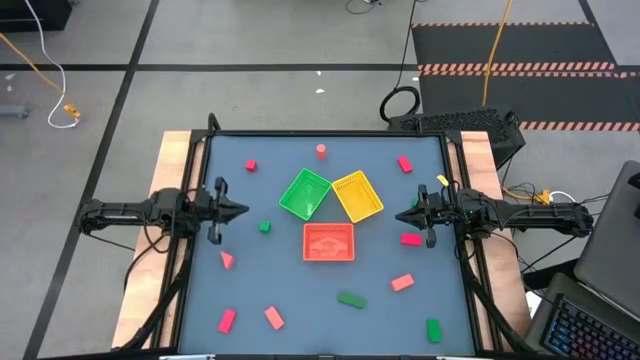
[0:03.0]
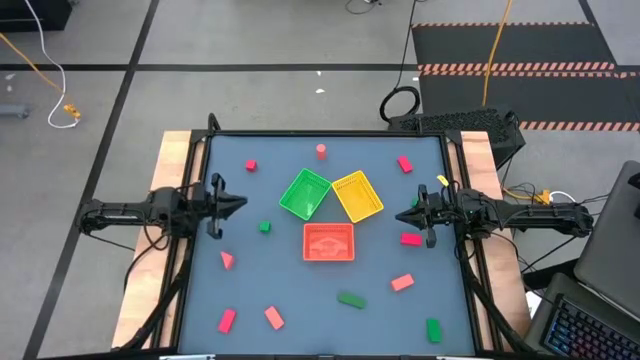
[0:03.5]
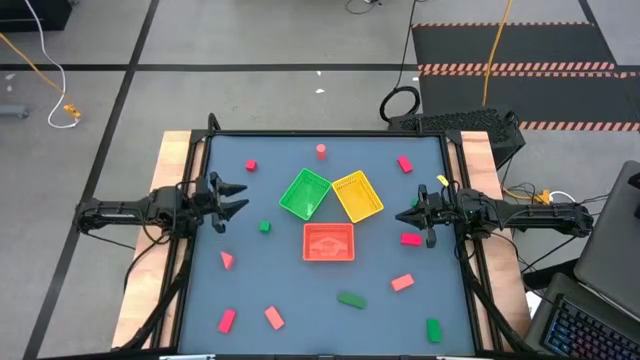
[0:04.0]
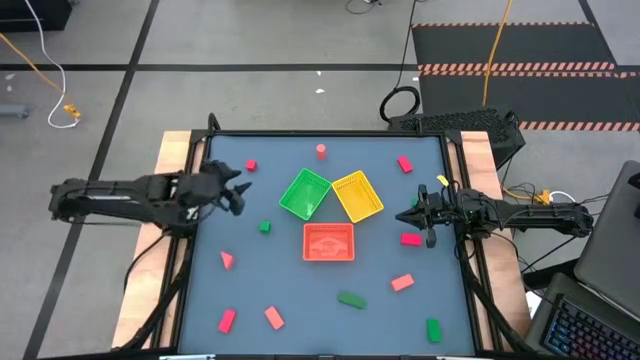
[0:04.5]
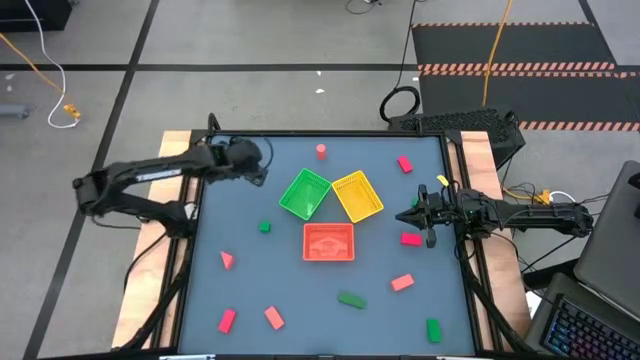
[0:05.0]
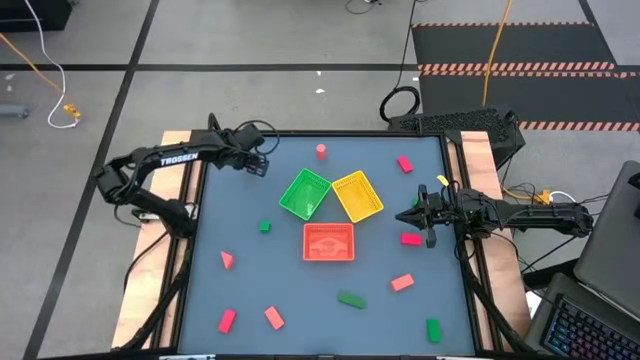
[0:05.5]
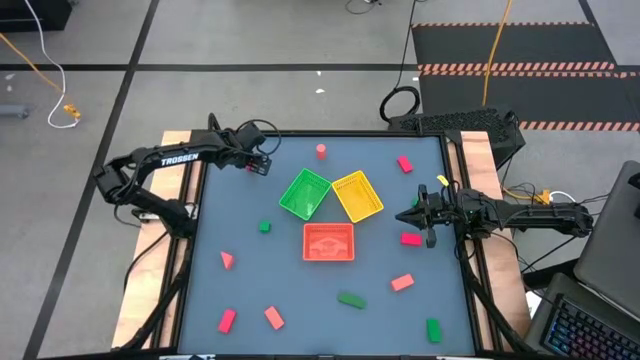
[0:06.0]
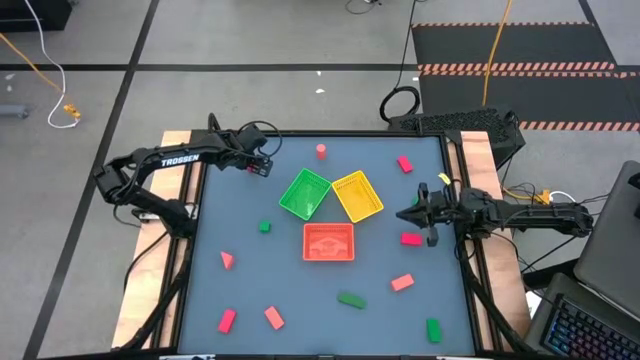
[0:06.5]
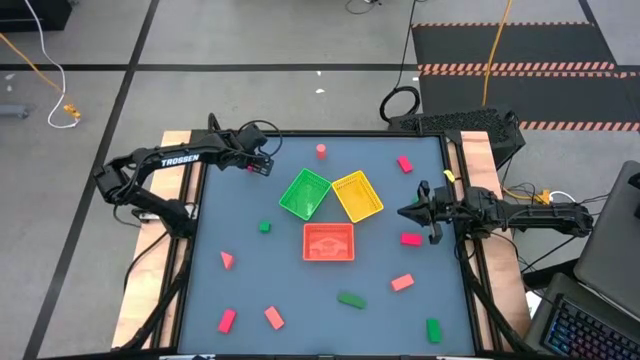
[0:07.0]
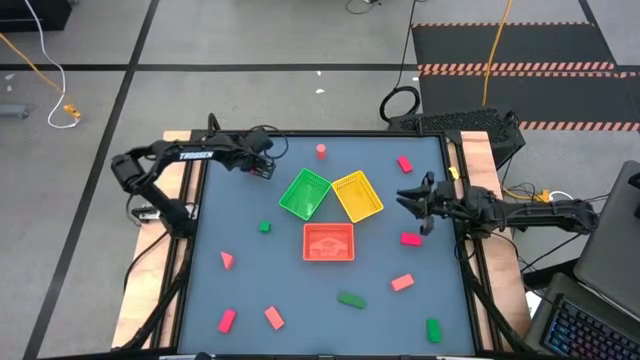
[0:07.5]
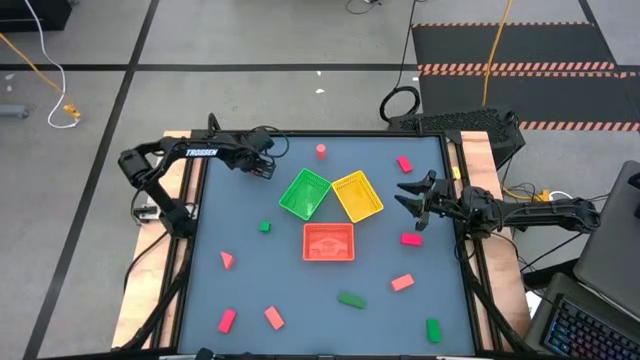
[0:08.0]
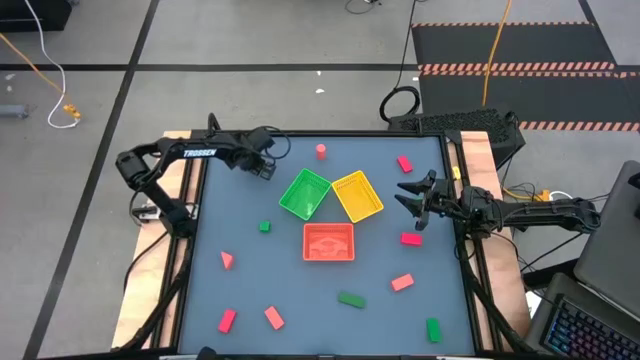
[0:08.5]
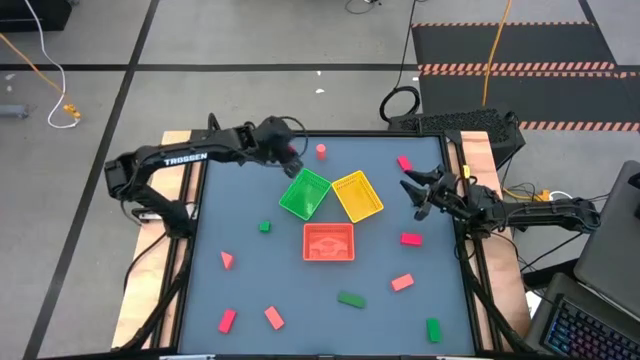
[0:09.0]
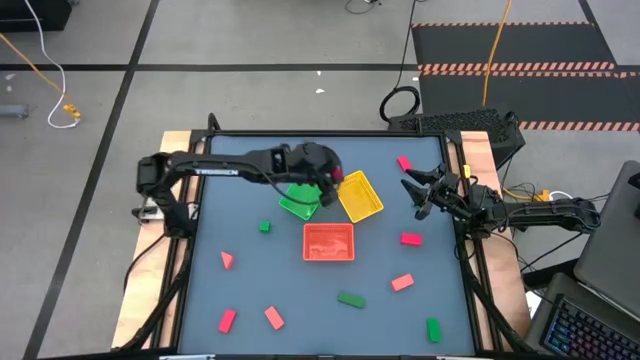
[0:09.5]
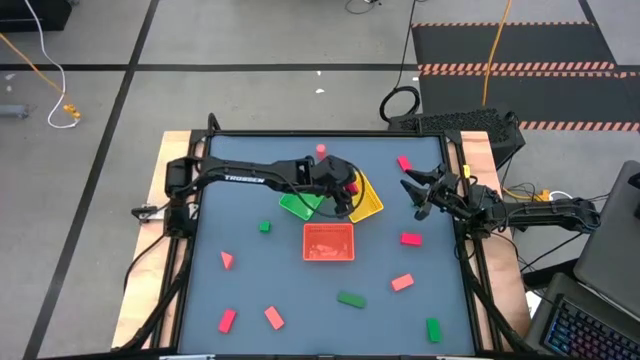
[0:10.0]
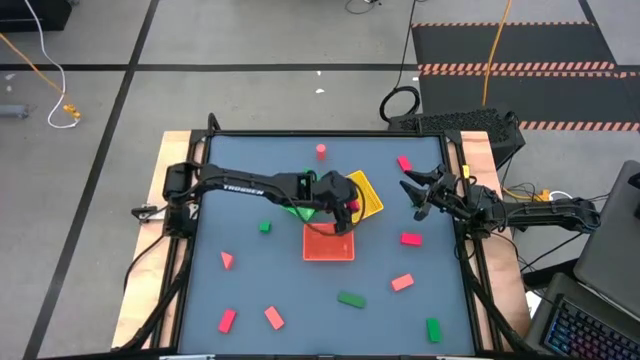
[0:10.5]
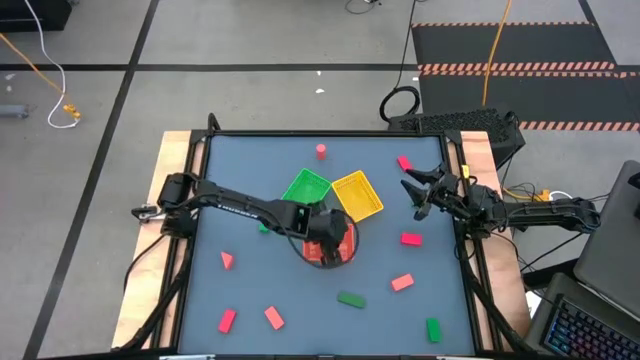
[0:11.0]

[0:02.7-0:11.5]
Task: Sort & place blocks by color
Put the red block into the orange bin

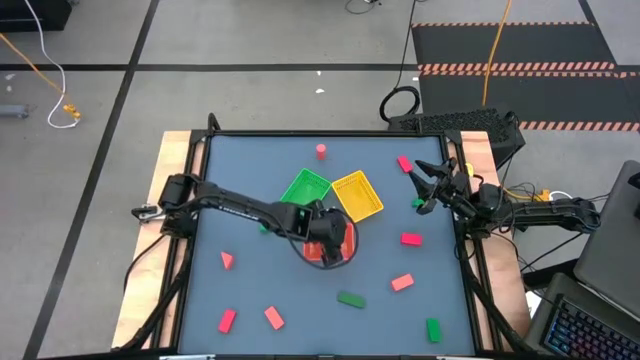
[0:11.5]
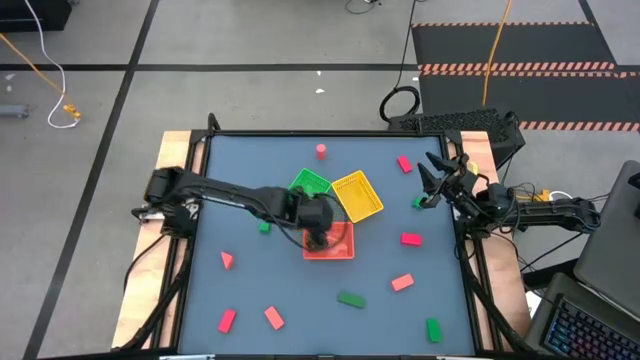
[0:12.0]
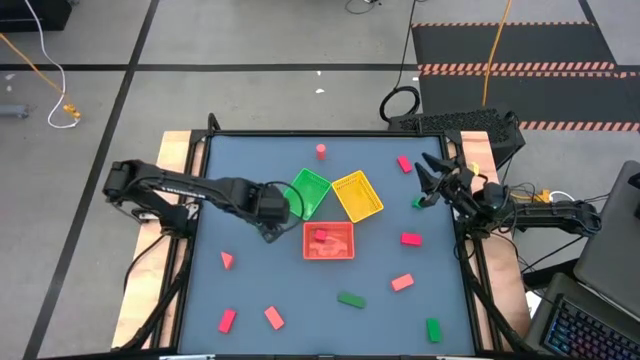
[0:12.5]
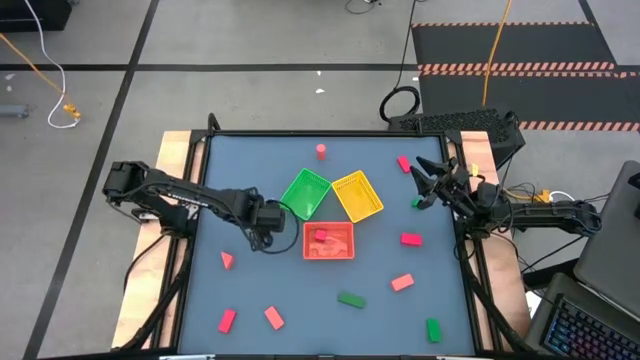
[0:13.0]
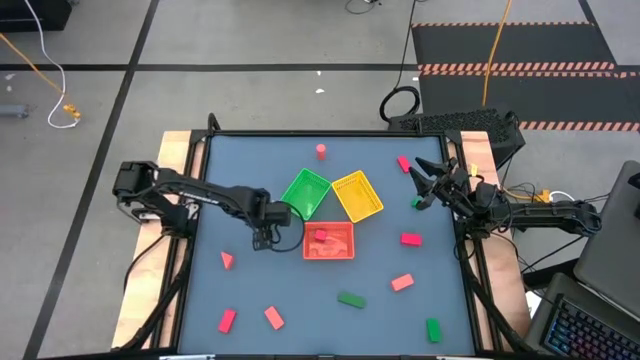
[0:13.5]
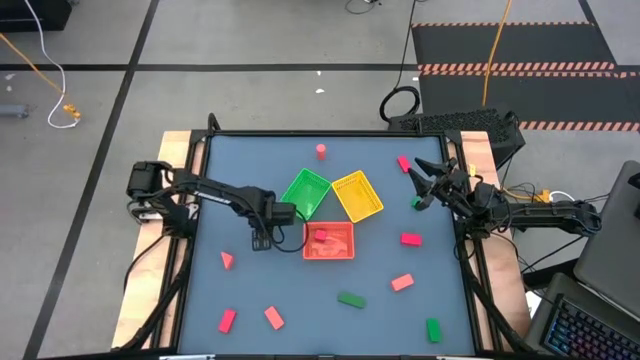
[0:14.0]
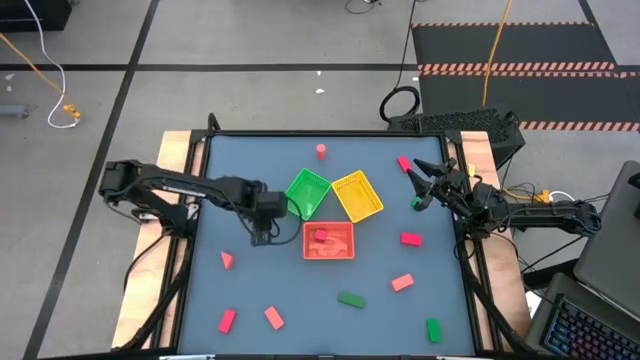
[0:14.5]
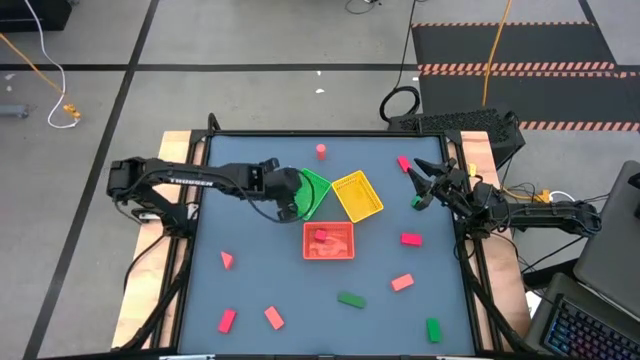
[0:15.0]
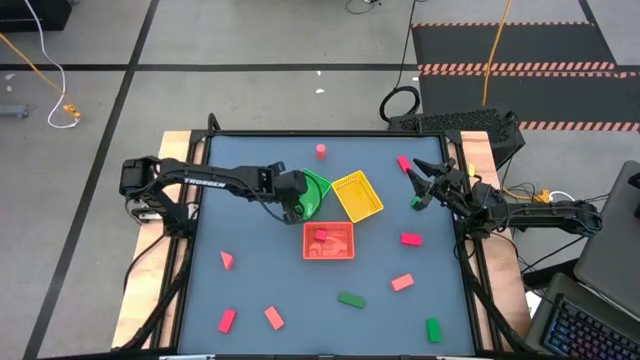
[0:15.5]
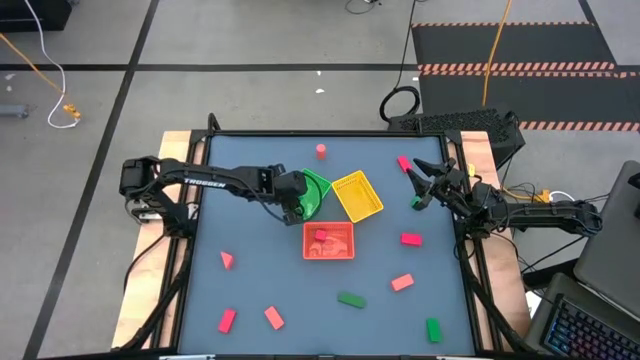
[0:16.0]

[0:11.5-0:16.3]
Put the green block into the green bin

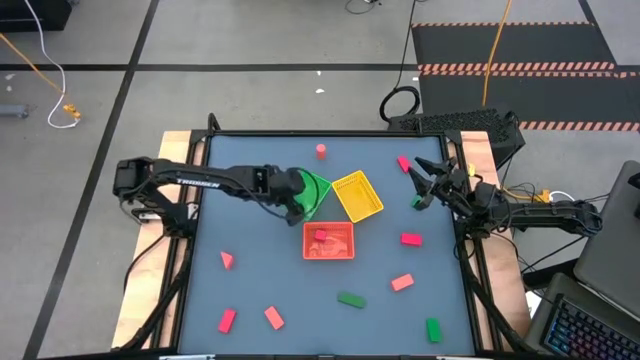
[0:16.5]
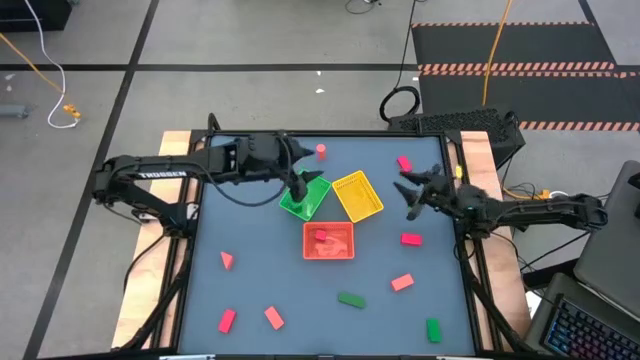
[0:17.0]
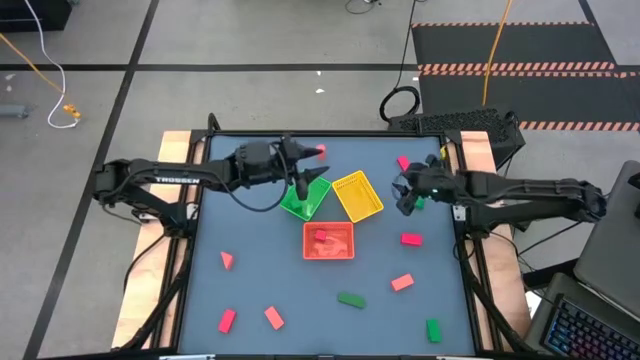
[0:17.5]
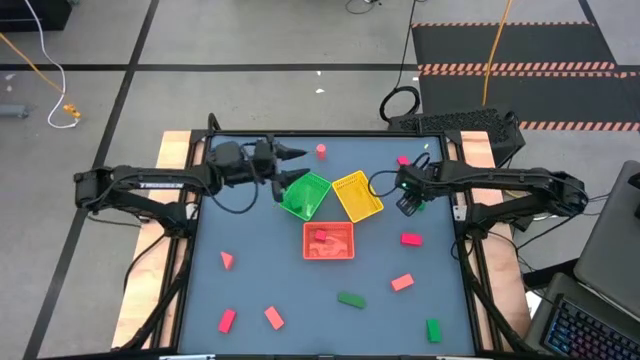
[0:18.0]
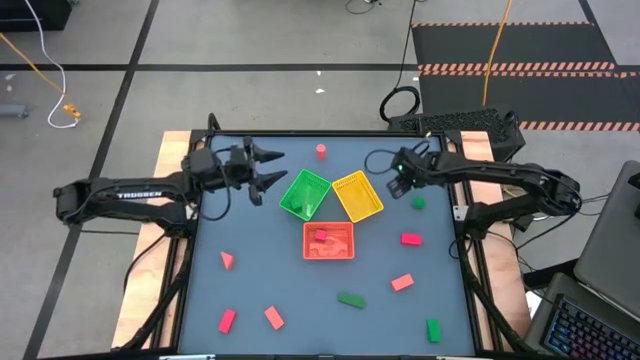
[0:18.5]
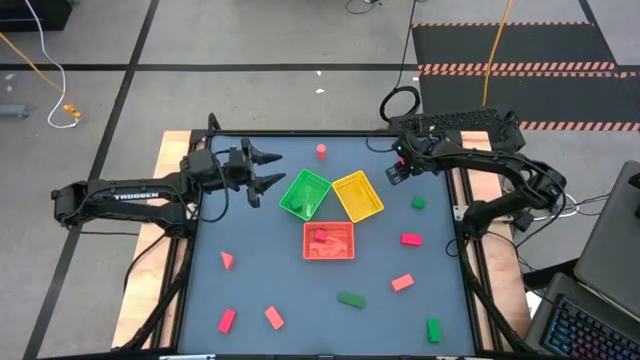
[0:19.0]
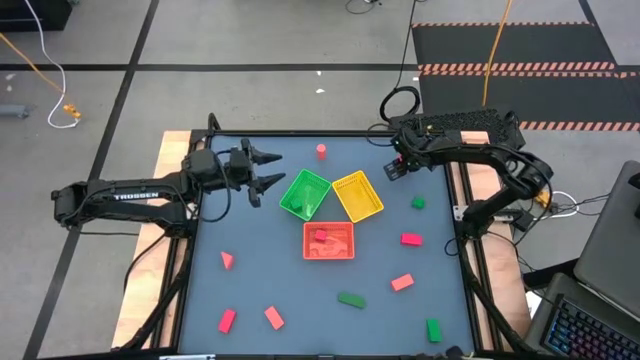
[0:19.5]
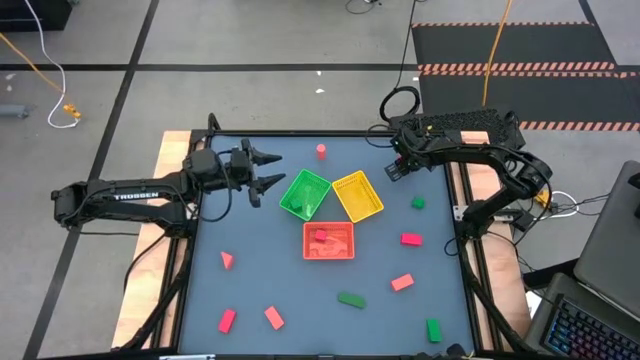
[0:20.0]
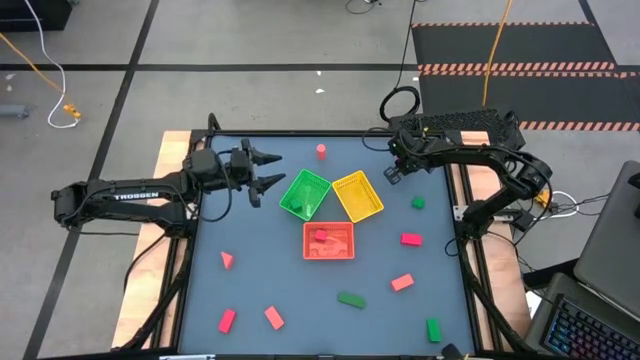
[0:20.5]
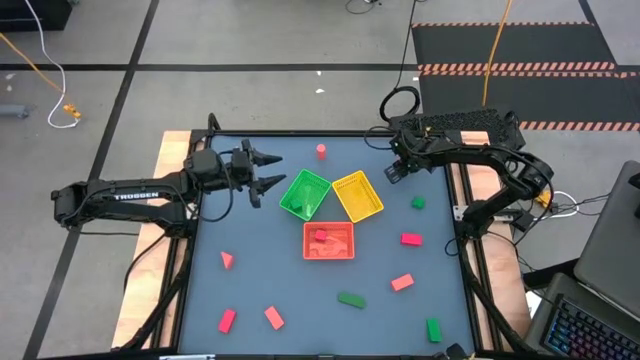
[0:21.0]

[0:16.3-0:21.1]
Put the red block into the orange bin

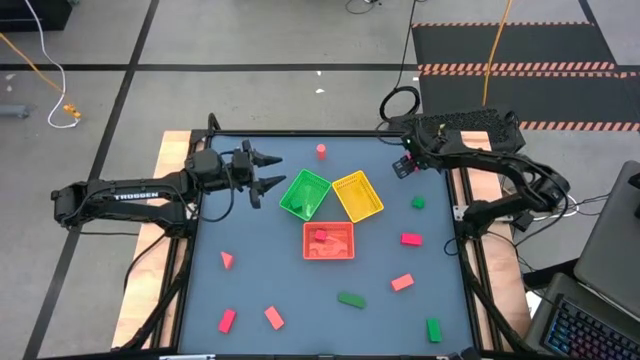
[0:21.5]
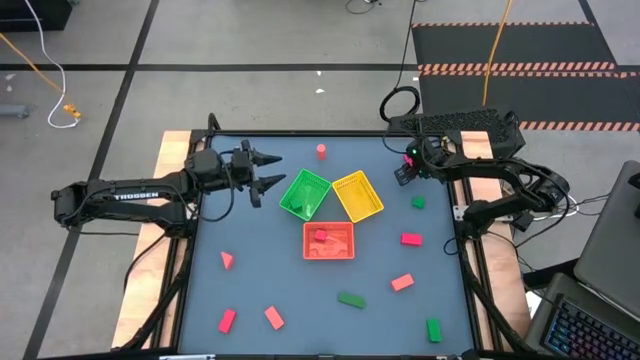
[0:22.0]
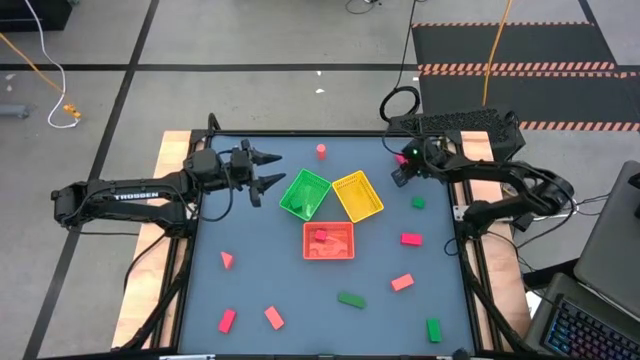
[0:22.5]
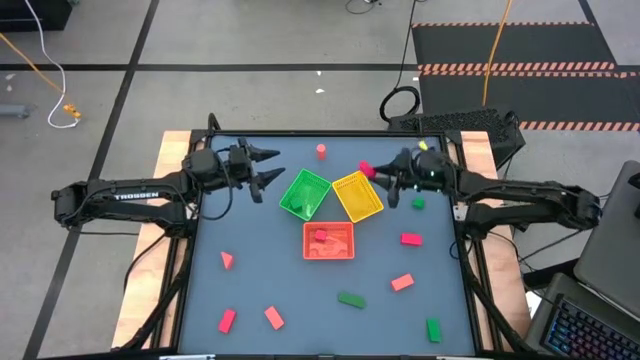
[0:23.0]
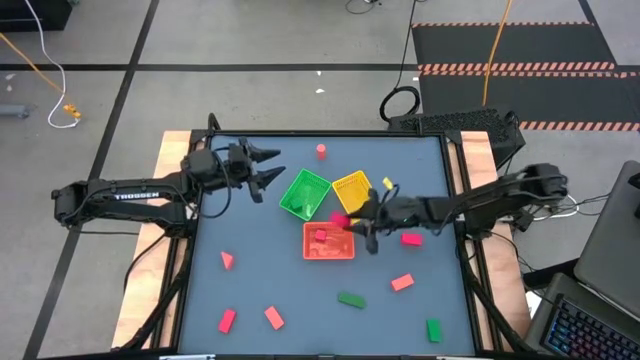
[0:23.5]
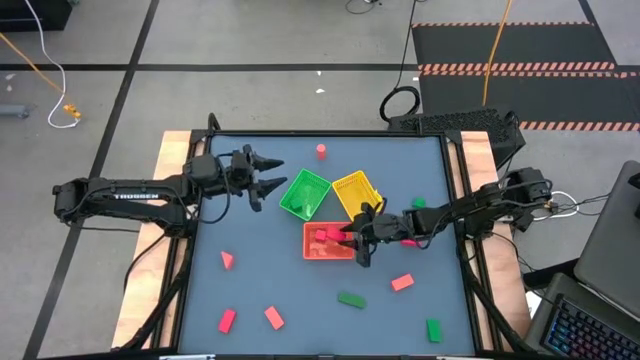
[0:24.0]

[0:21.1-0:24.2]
Put the red block into the orange bin
